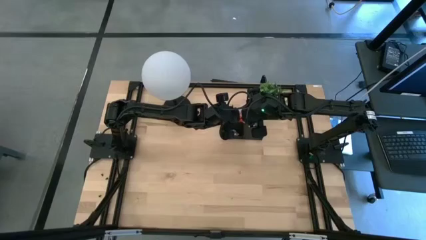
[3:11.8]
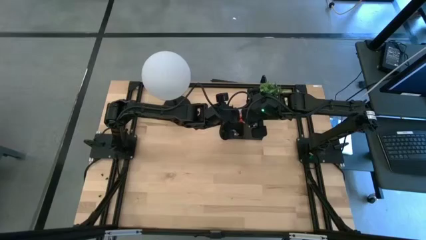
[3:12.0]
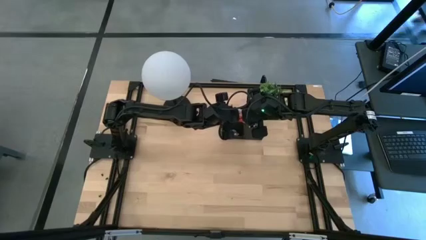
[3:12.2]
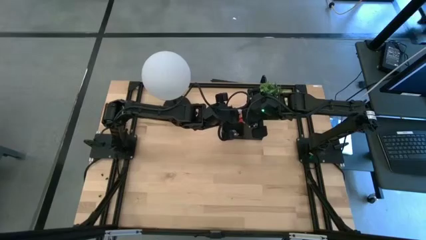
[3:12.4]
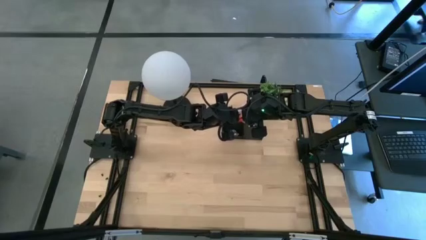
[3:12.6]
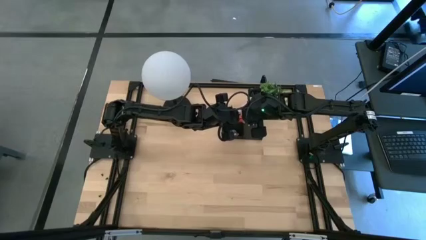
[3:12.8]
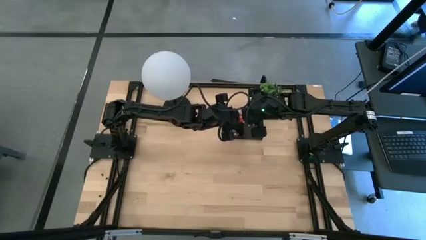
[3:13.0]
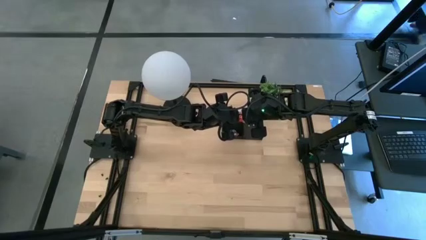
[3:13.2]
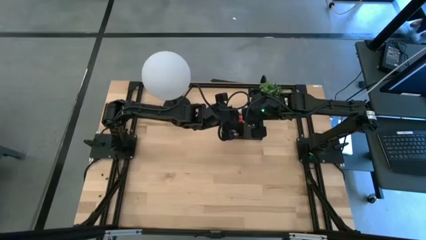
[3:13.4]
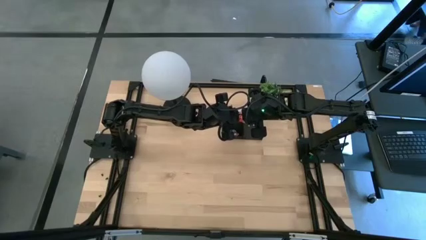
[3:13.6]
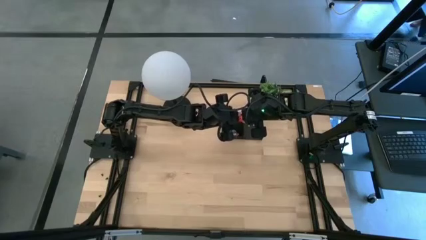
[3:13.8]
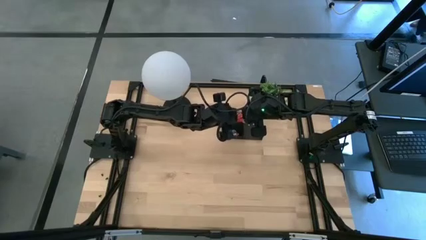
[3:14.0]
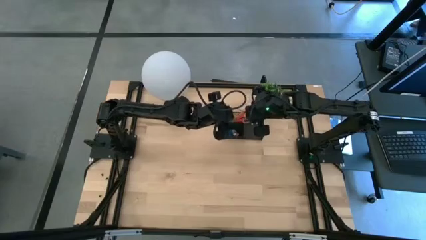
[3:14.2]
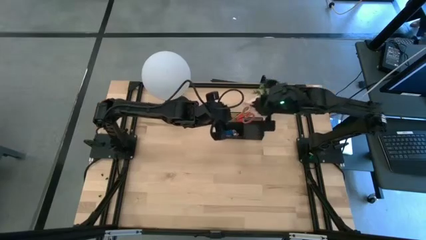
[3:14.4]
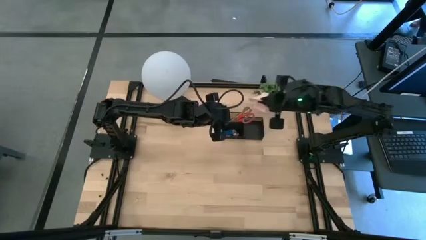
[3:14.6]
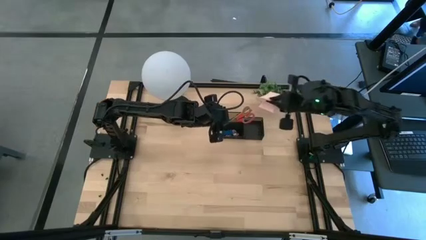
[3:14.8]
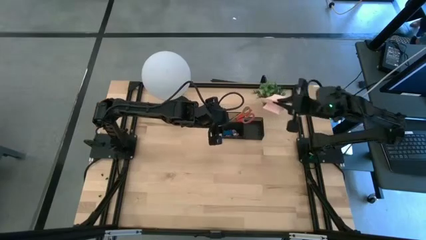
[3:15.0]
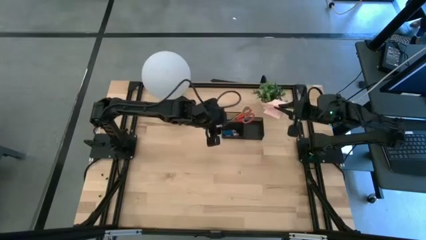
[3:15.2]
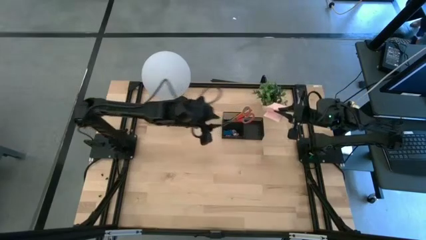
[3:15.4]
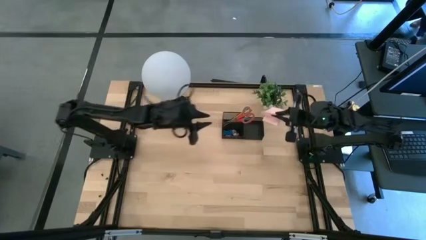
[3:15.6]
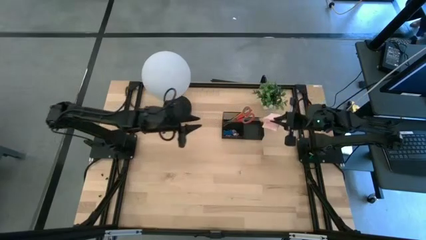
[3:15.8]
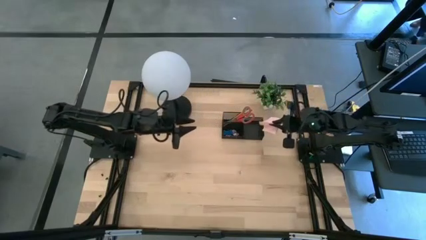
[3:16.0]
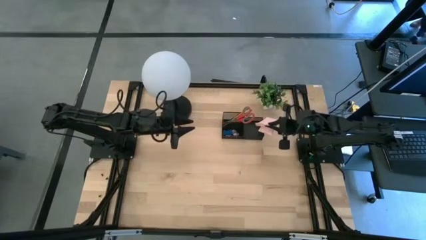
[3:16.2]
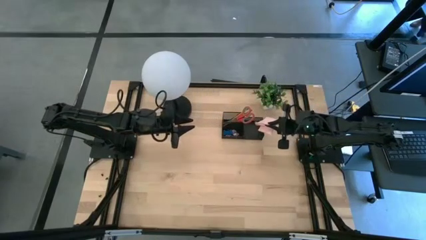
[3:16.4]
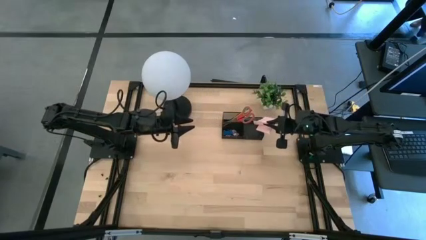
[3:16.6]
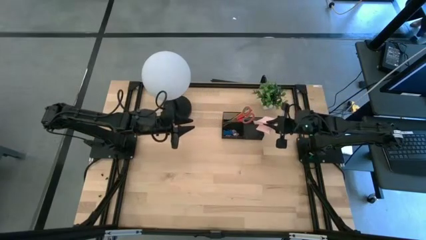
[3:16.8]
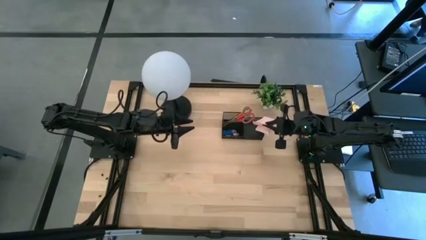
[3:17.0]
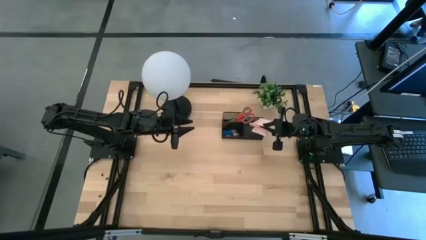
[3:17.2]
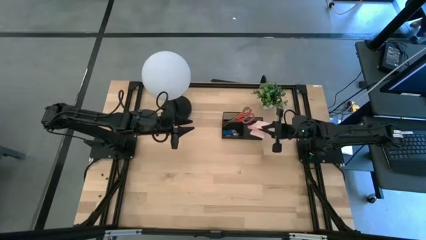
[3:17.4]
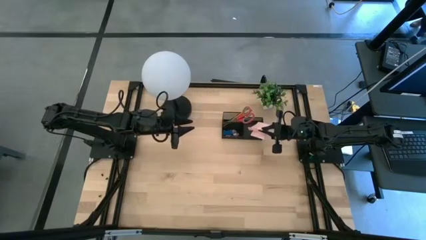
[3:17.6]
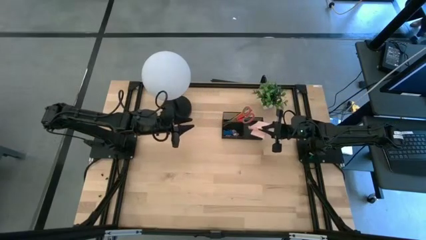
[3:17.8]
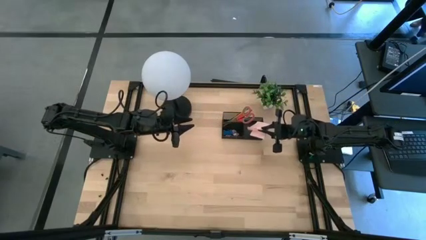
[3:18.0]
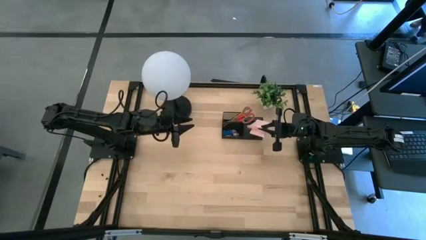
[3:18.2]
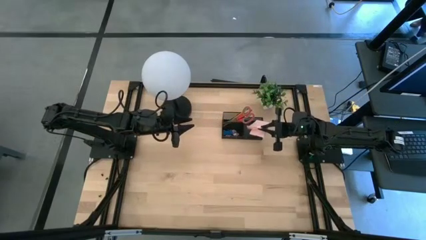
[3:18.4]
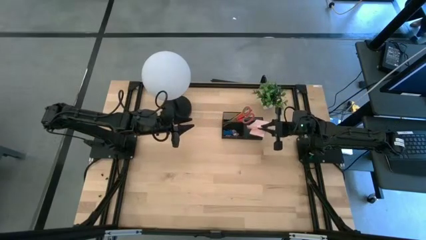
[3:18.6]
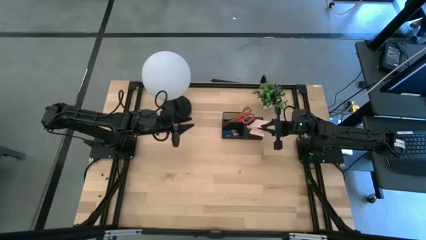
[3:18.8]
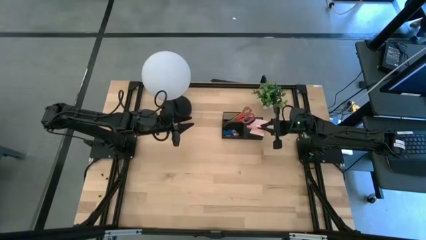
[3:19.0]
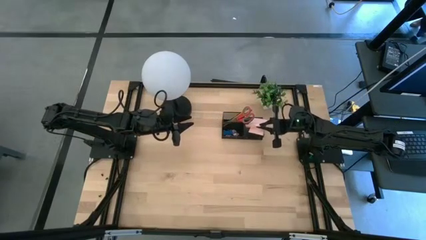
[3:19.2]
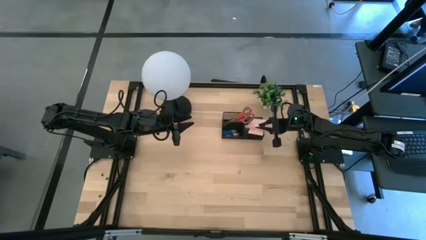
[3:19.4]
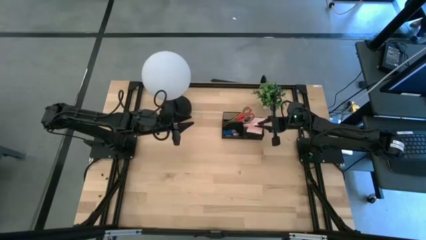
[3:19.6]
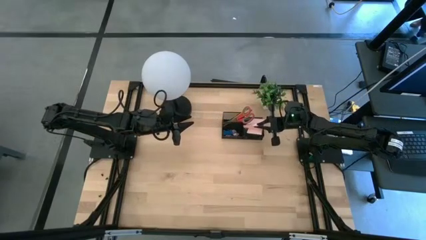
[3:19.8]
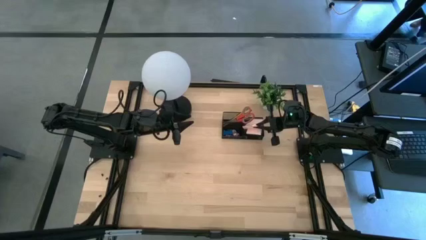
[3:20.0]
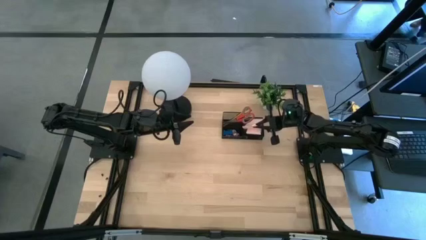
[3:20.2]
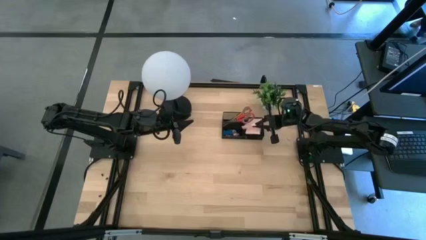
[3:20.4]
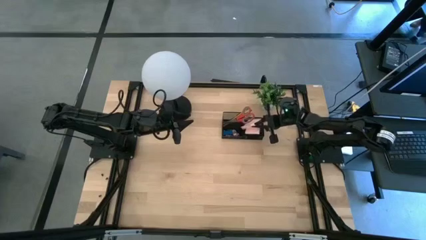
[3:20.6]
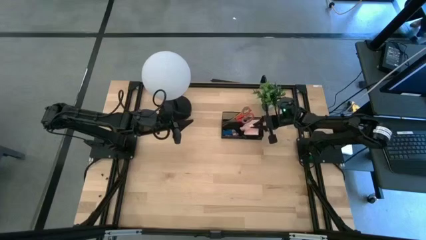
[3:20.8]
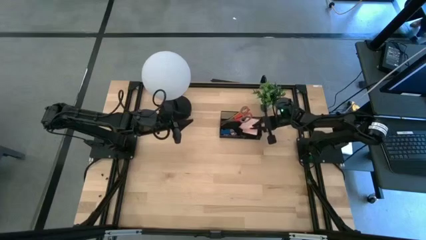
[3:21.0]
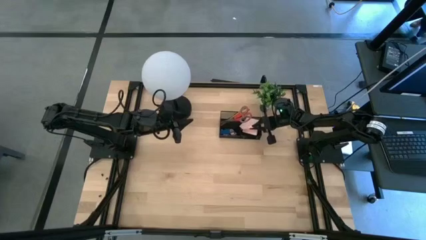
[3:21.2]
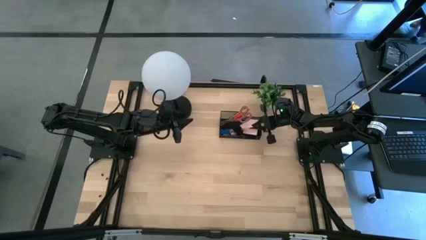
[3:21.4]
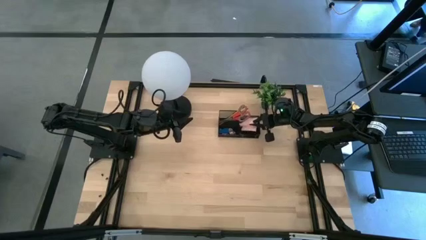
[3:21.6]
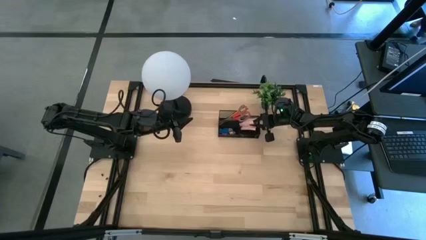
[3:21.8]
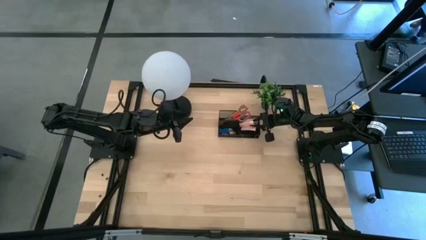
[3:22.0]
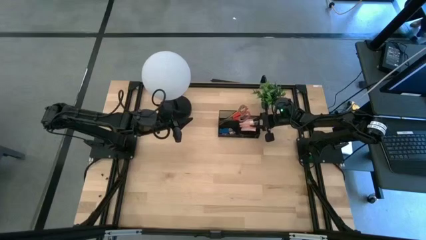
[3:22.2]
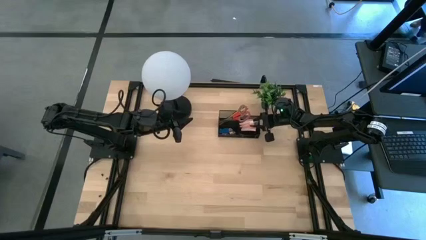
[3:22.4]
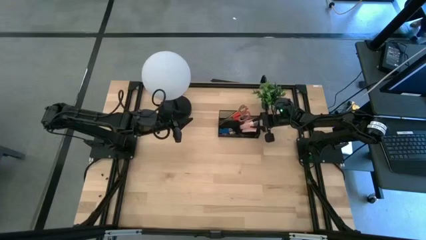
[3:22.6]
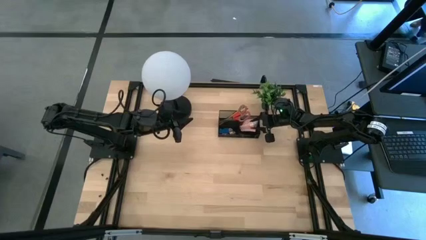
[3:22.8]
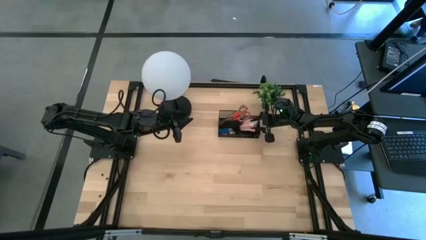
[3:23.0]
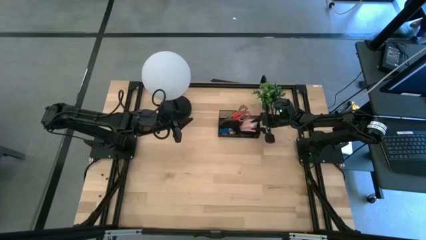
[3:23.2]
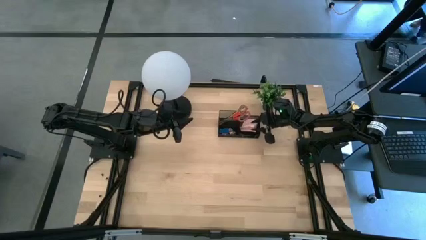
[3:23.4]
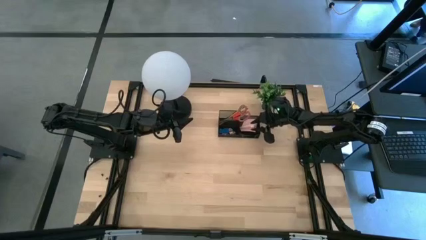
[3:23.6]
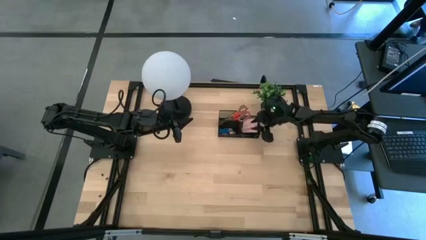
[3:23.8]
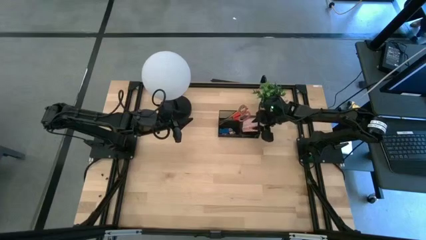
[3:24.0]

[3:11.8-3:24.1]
Task: Pick and place office supplies into organizer
Put the pink sticky notes into the black desk organizer
